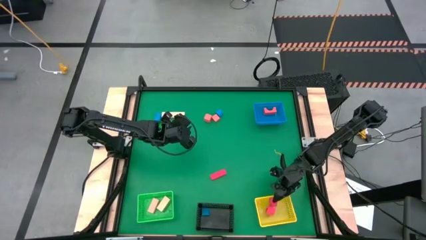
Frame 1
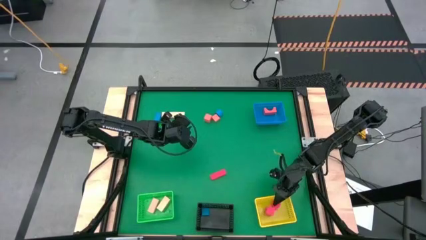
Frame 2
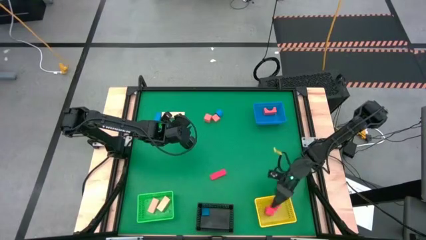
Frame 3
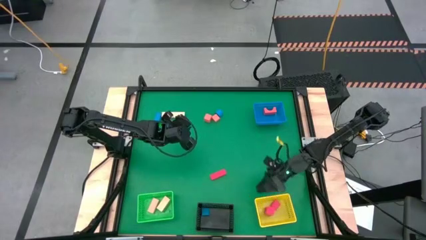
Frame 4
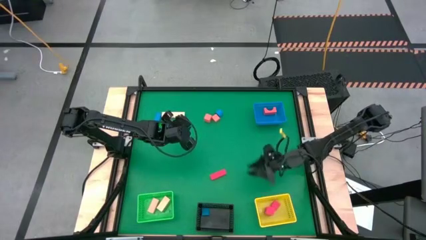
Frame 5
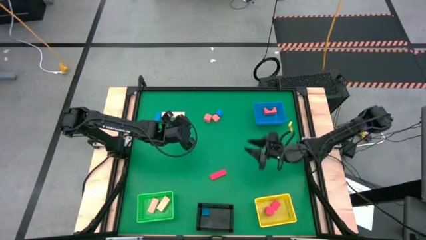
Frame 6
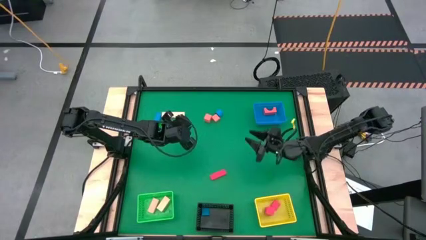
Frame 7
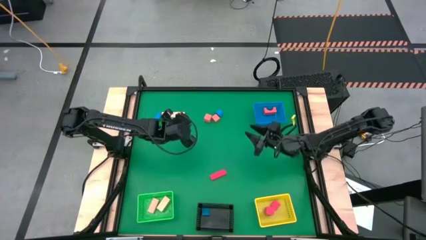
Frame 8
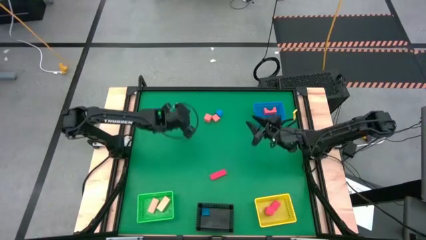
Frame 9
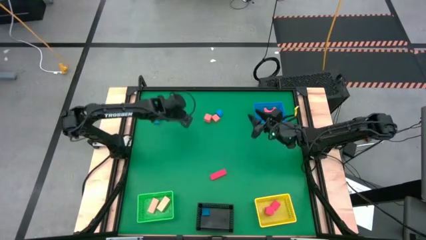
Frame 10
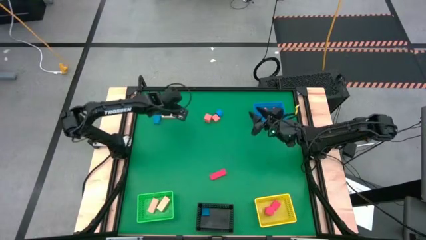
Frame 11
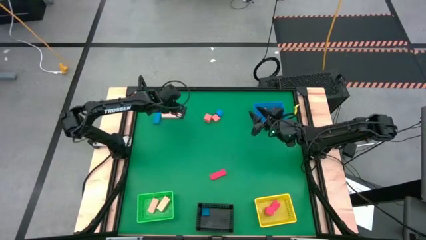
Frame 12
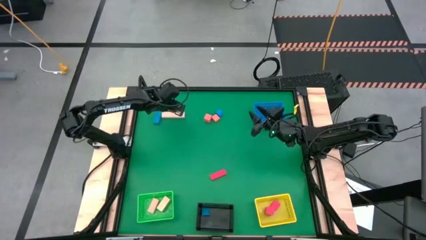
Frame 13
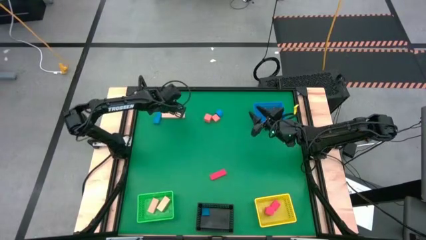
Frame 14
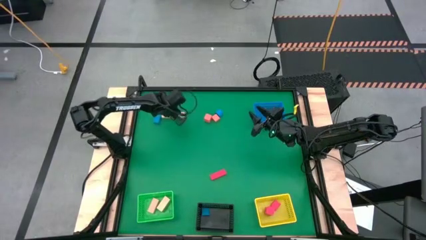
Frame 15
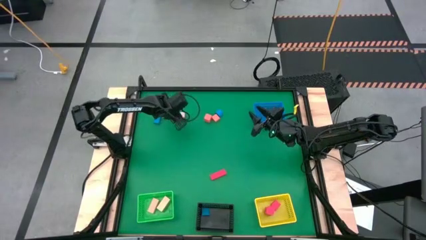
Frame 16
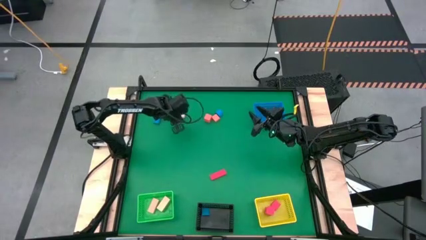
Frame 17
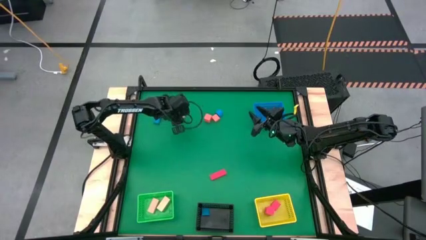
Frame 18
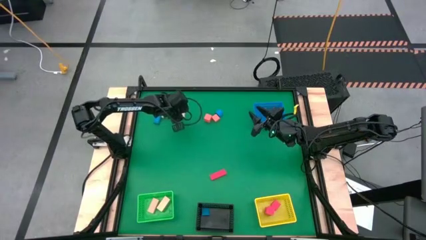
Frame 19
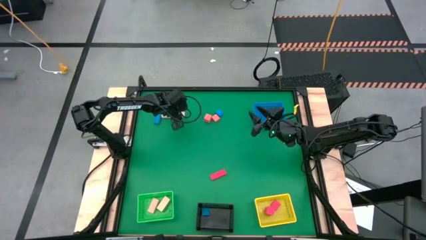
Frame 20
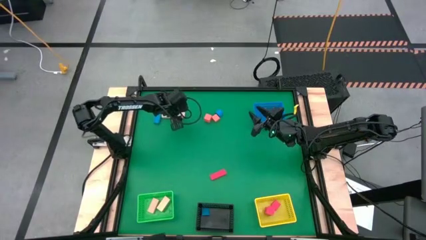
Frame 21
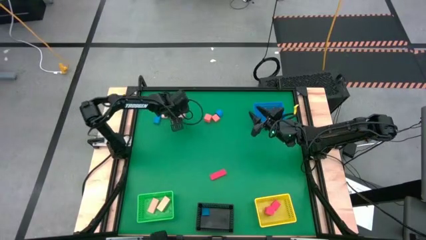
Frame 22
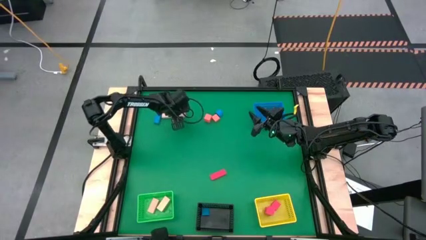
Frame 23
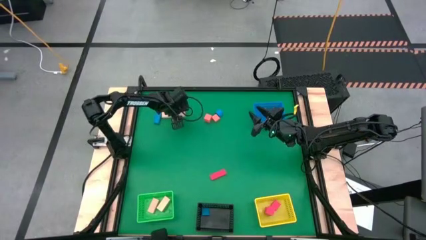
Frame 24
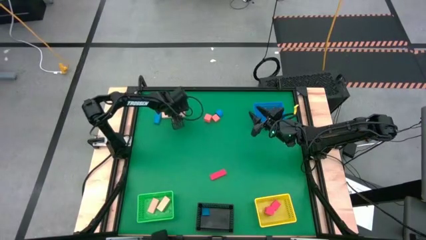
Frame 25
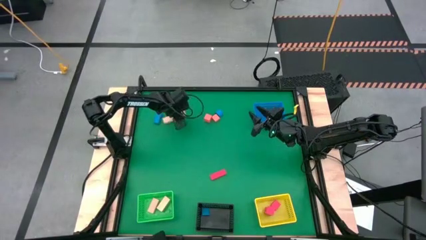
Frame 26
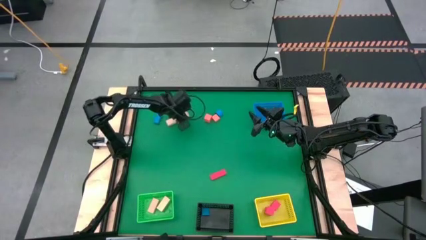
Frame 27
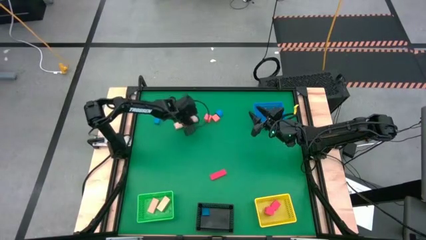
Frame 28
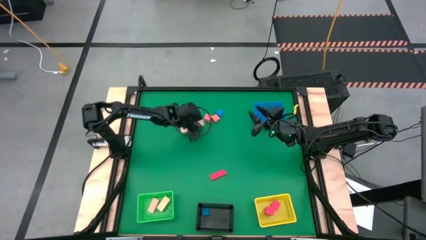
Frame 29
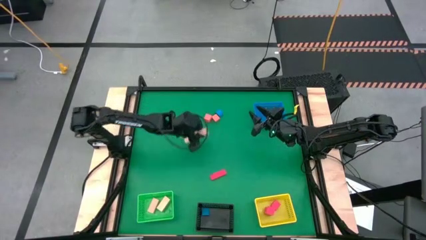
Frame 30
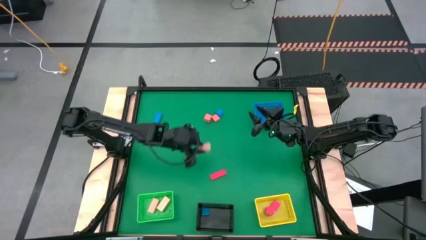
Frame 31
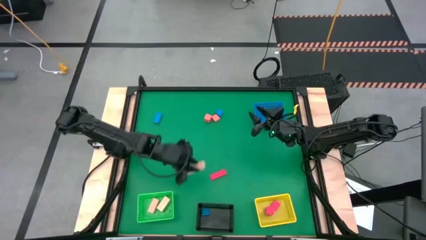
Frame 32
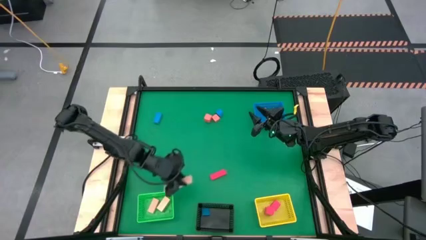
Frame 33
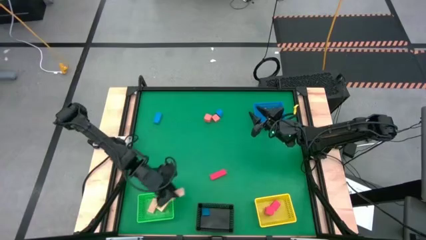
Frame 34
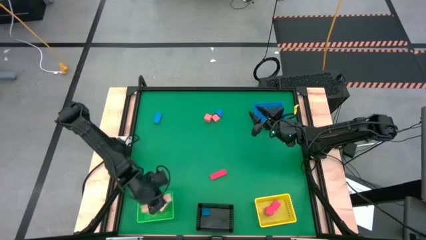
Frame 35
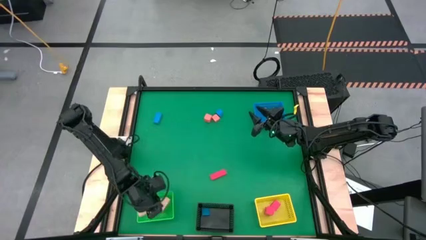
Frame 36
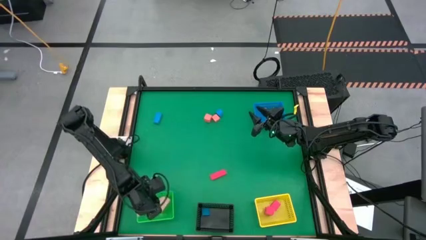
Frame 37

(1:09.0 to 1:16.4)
Task: Sort & place blocks by color
Put the light brown block into the green bin

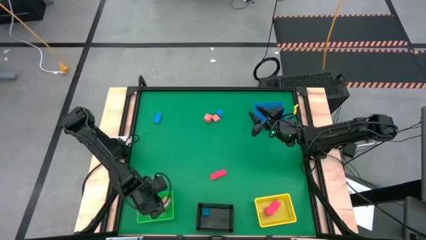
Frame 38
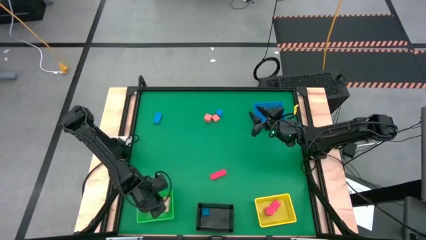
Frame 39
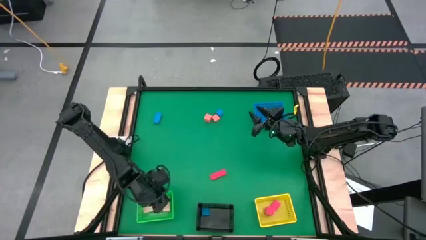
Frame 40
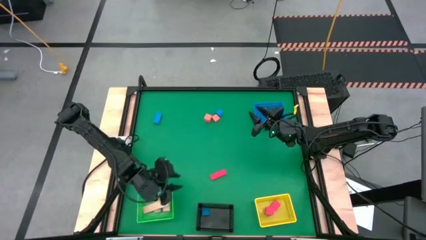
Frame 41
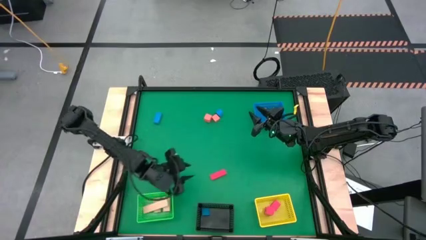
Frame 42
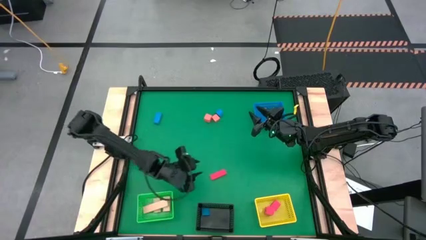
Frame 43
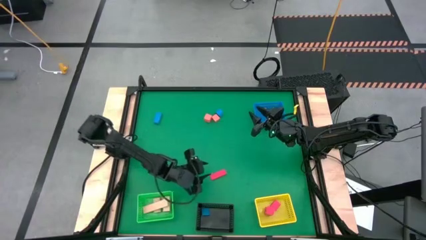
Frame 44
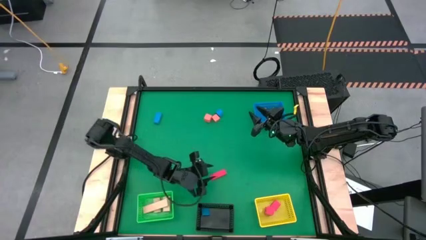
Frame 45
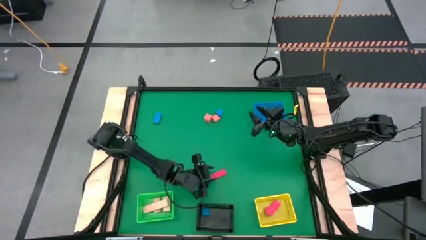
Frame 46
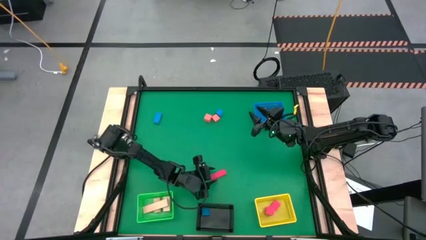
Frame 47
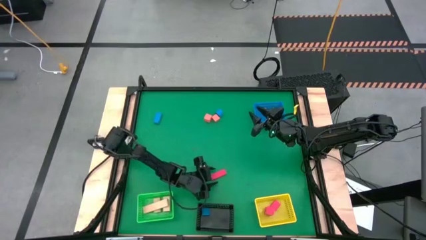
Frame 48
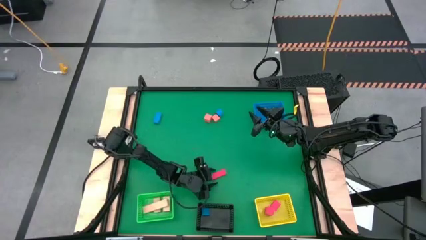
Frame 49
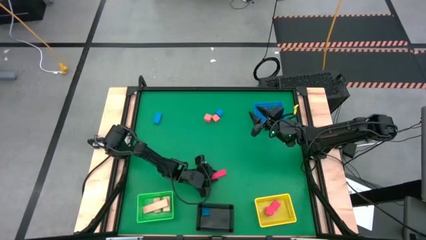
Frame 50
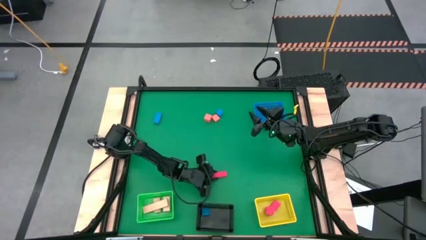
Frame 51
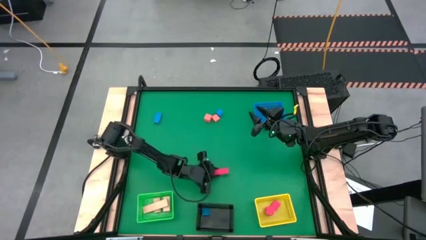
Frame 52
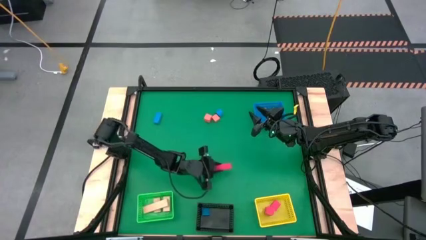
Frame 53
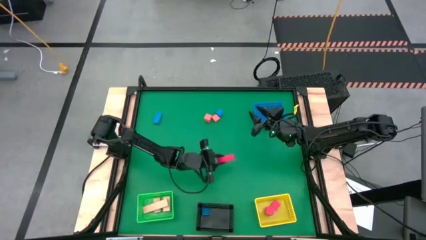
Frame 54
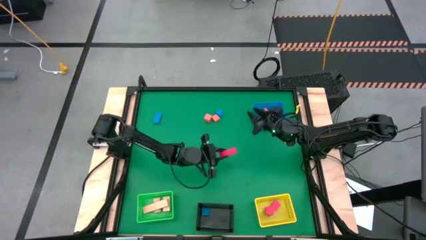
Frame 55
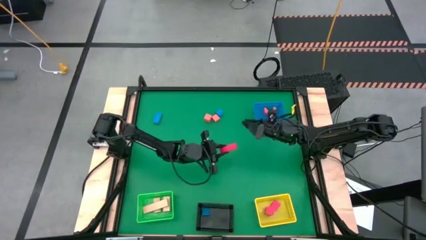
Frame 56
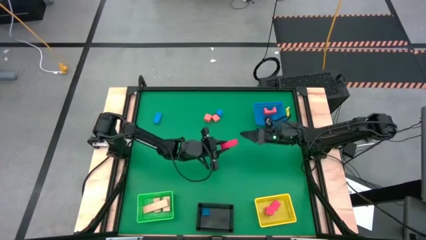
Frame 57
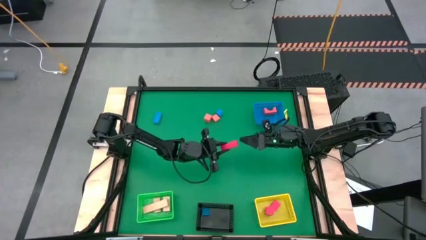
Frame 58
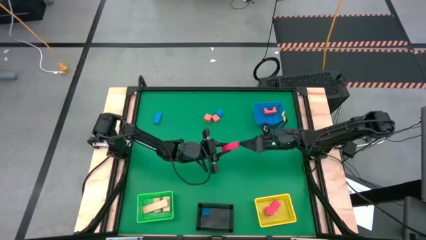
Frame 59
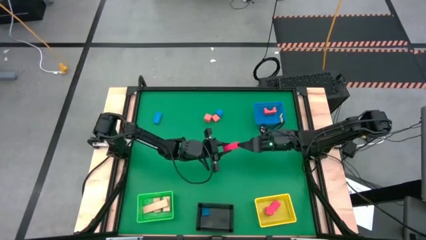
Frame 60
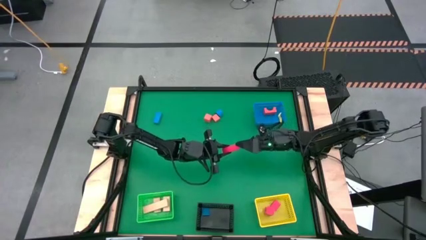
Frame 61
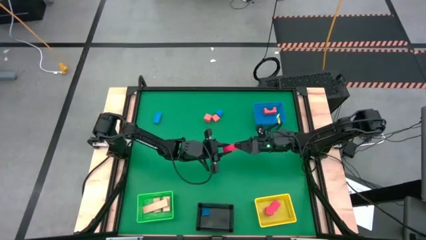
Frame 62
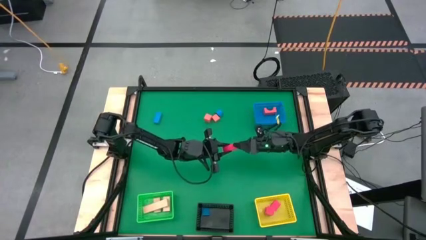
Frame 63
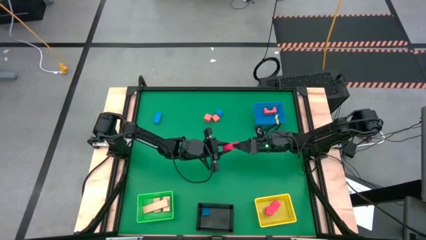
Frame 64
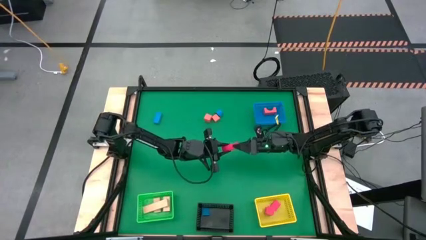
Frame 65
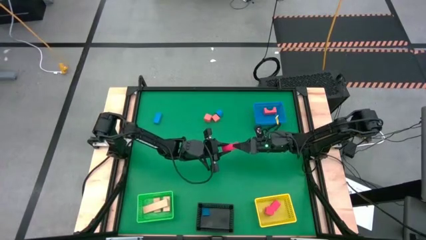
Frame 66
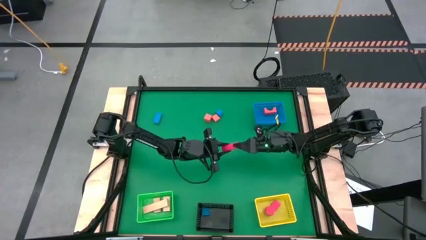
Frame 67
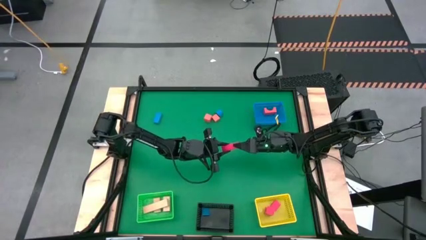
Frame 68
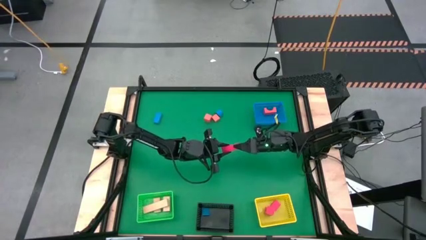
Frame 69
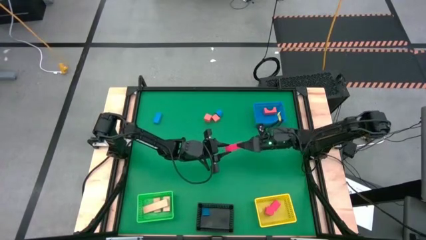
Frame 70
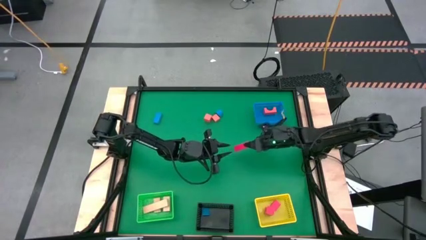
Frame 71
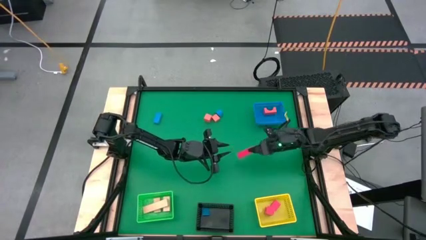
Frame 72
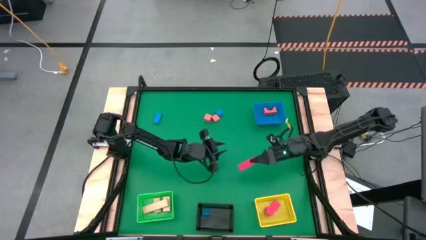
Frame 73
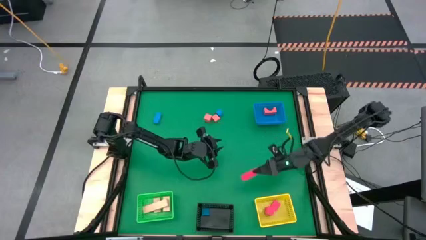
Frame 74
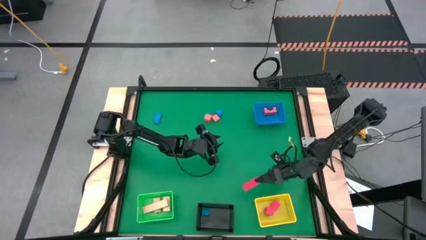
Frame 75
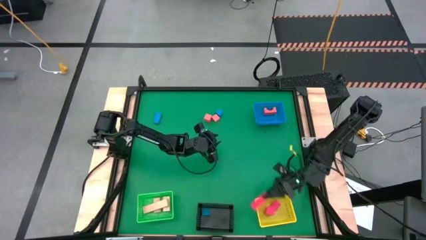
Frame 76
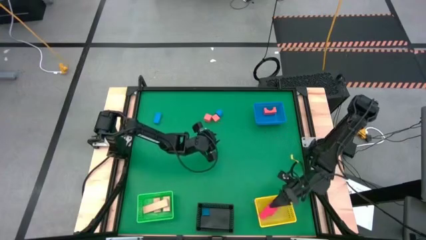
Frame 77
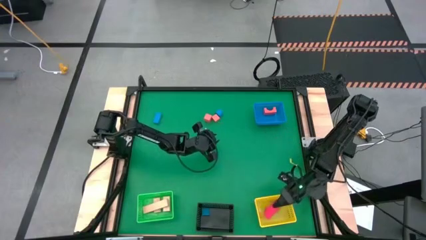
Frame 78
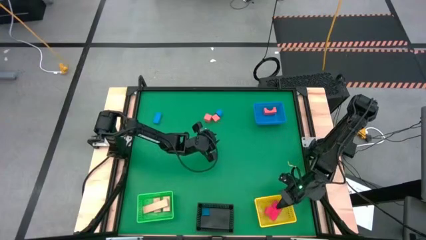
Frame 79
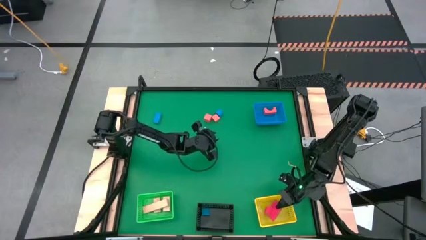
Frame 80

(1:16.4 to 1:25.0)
Put the red block into the yellow bin
